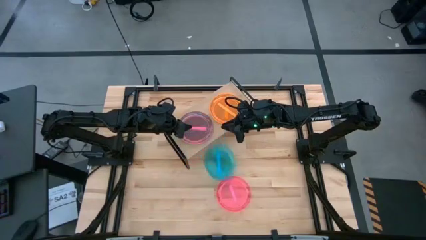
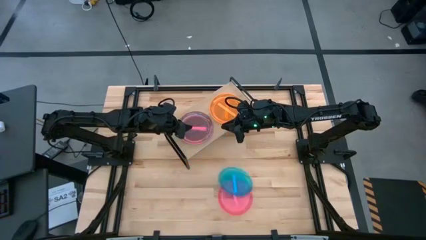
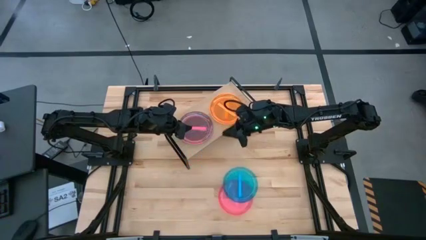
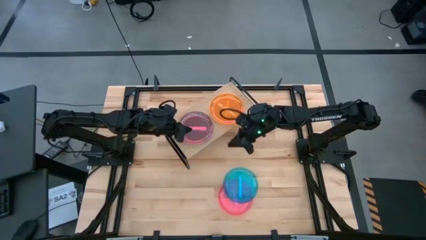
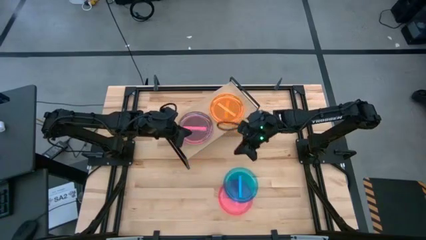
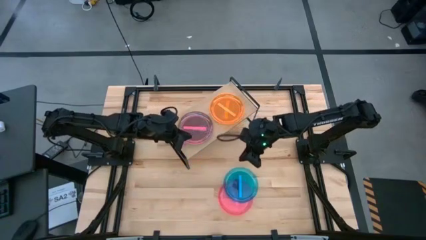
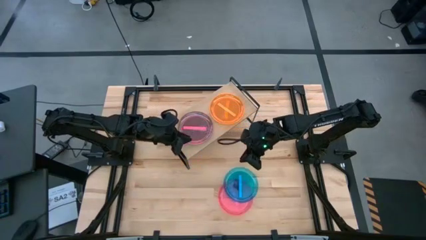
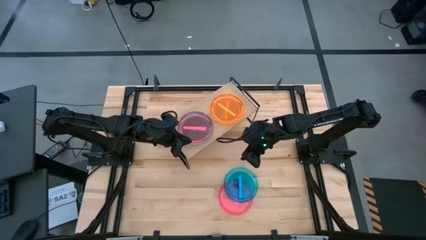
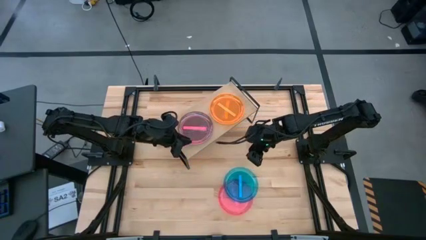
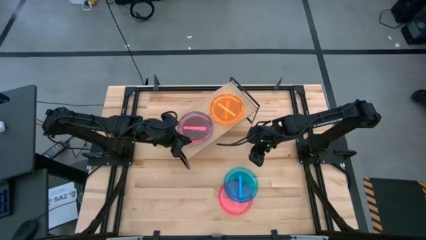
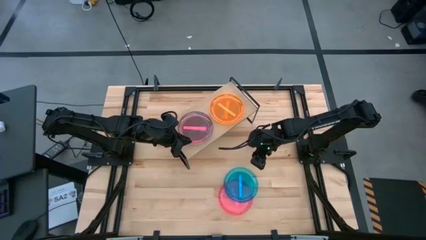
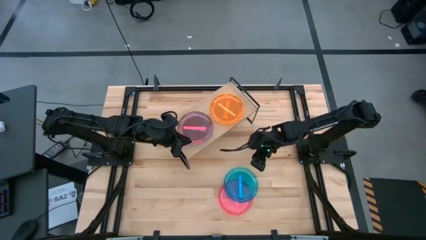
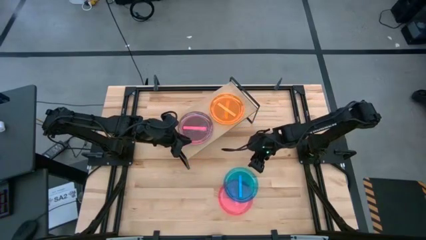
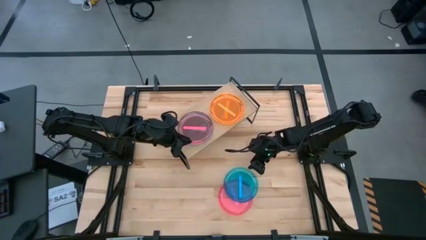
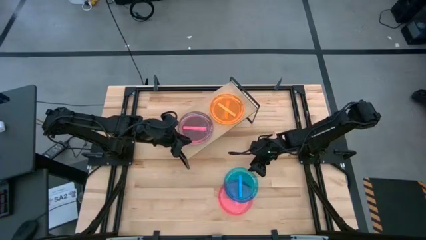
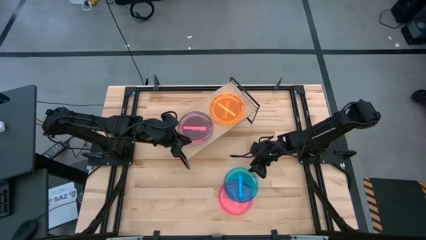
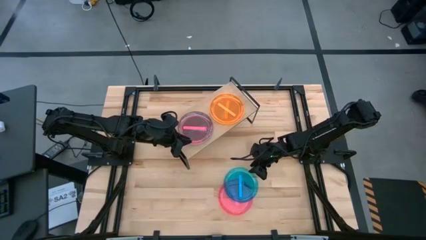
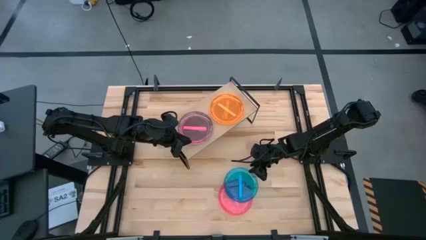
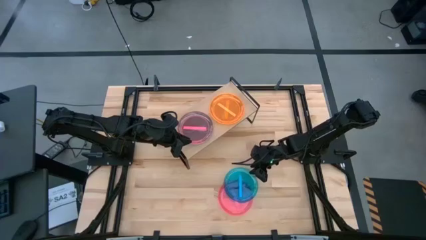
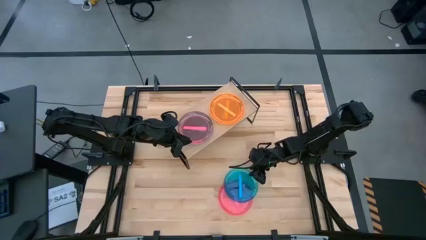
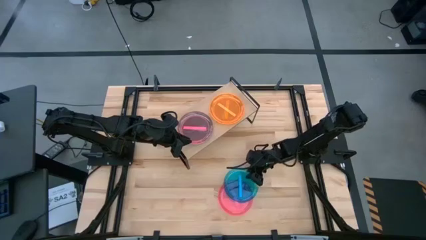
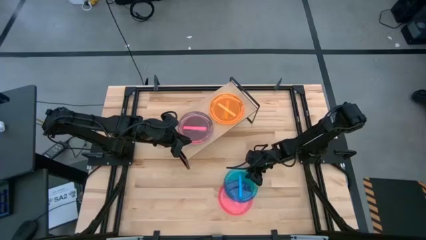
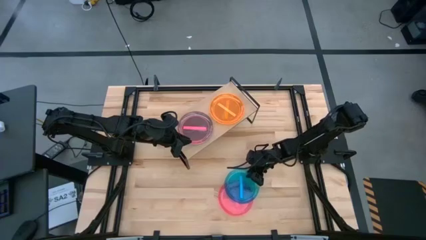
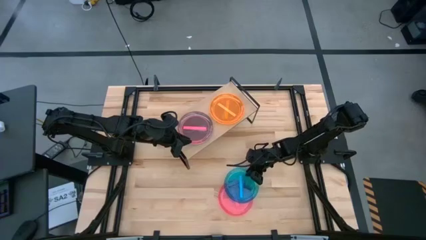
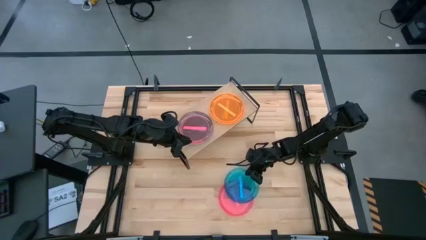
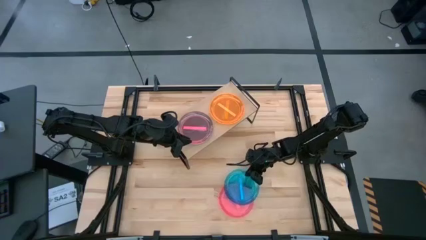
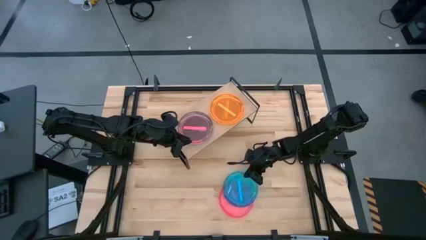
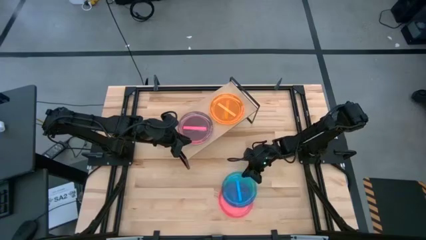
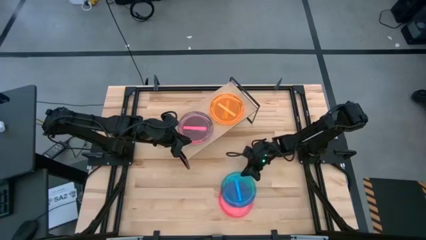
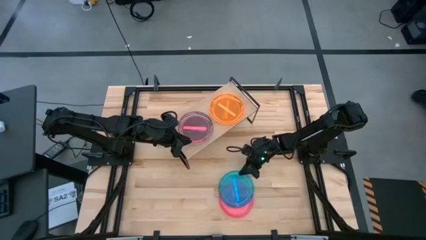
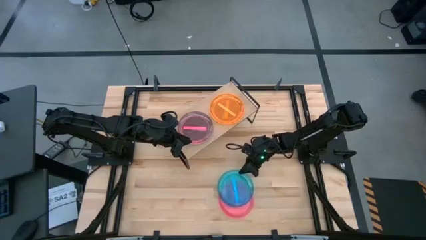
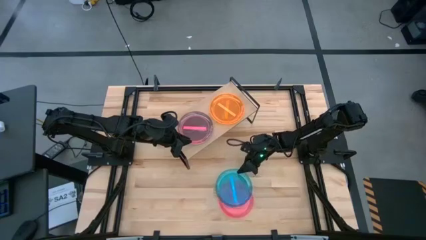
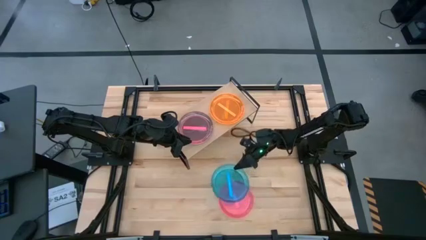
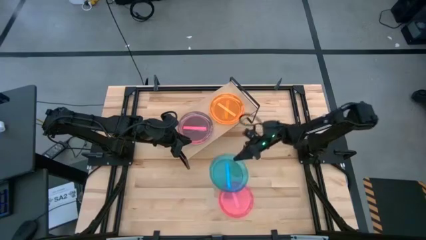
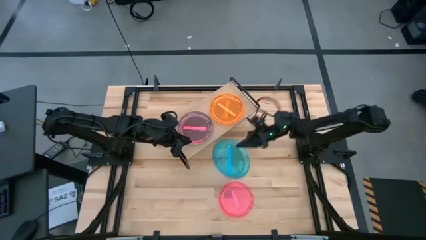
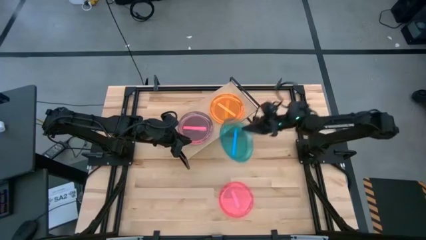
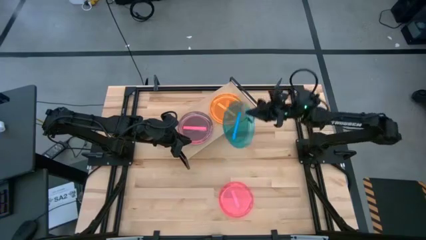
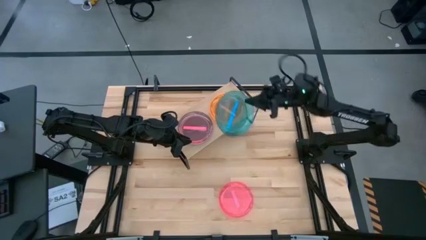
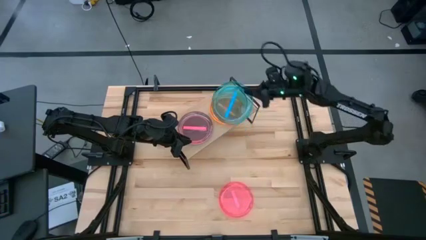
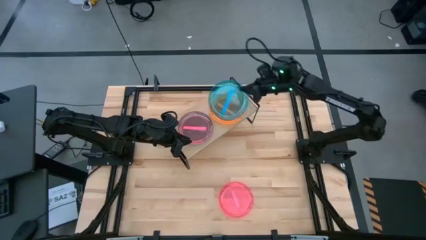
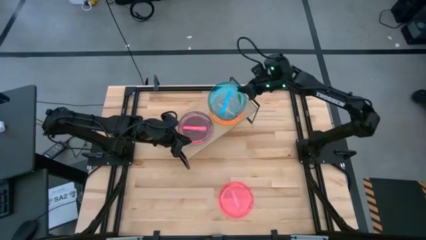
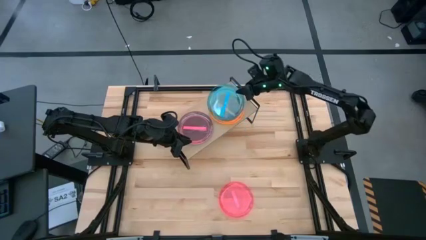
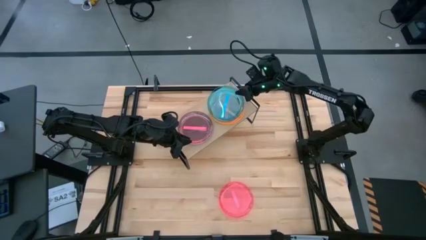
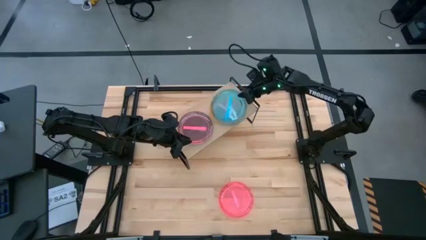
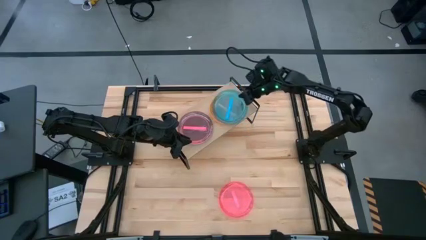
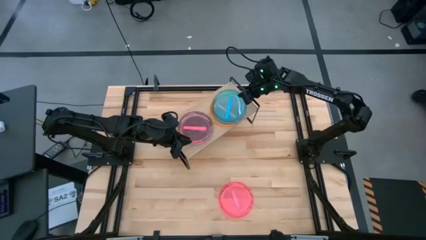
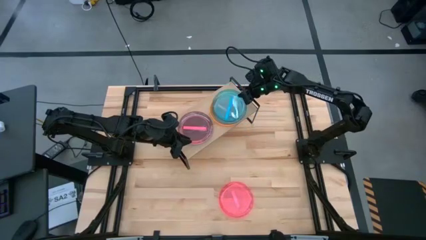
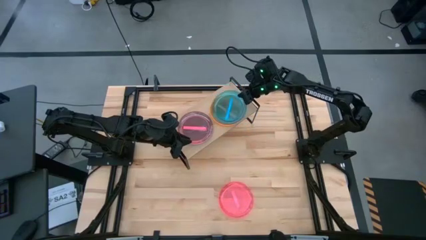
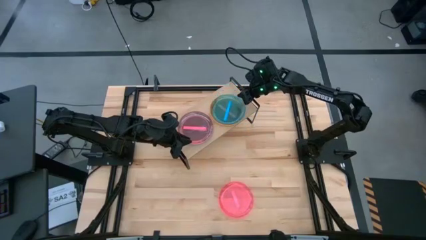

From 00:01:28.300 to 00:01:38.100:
Task: Place and stack plates onto a shelf
Stack the blue plate on the orange plate on the shelf
